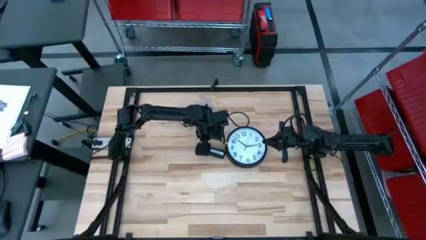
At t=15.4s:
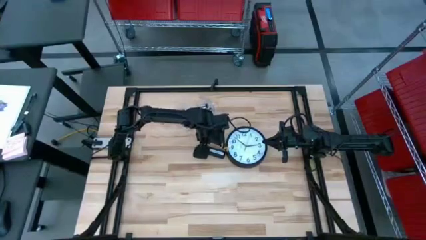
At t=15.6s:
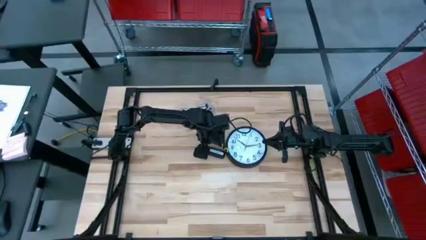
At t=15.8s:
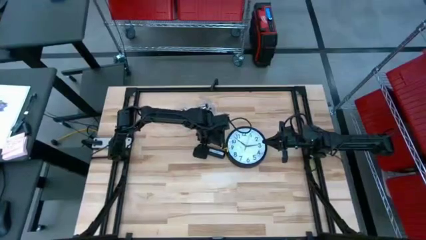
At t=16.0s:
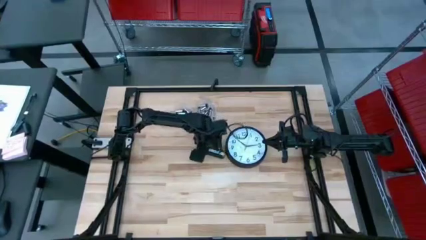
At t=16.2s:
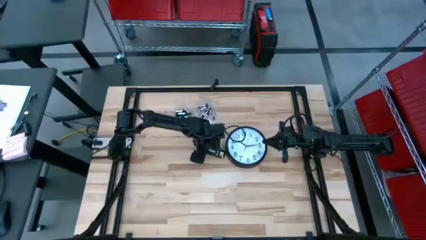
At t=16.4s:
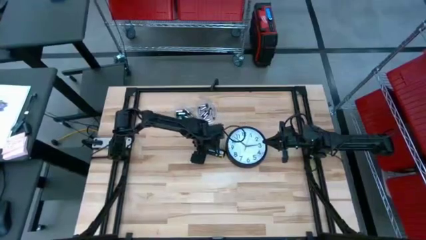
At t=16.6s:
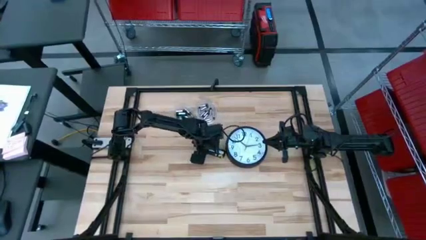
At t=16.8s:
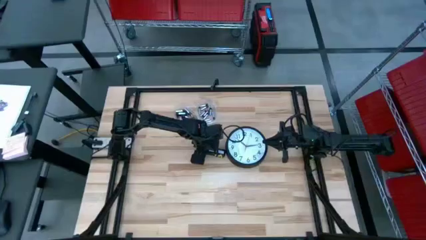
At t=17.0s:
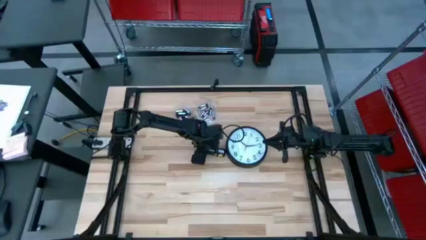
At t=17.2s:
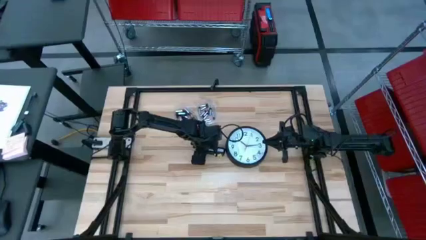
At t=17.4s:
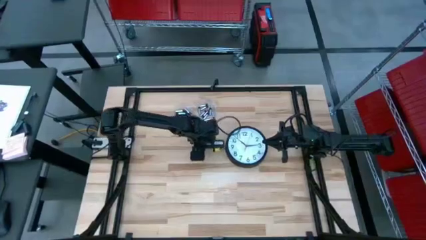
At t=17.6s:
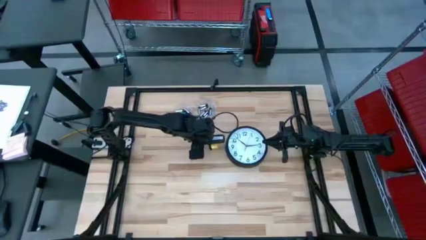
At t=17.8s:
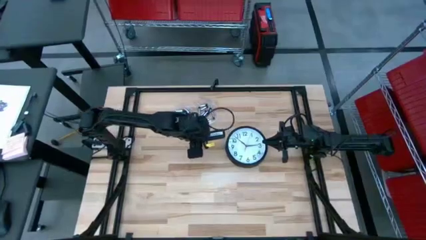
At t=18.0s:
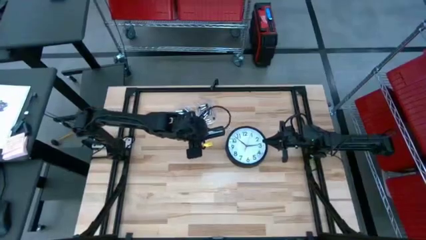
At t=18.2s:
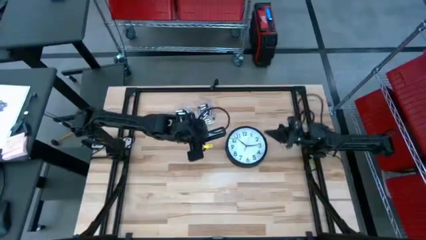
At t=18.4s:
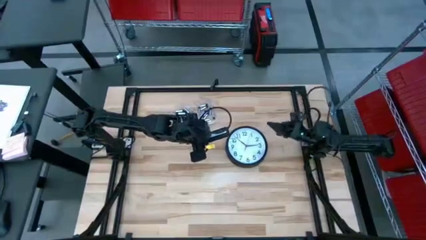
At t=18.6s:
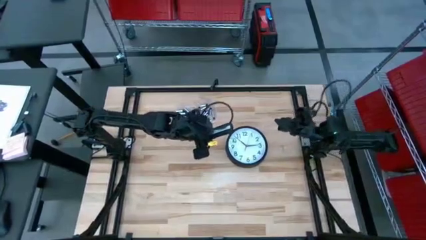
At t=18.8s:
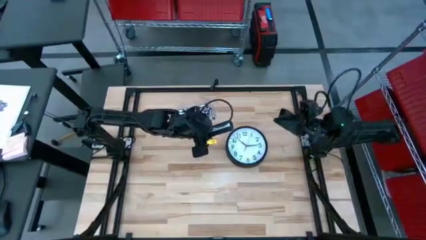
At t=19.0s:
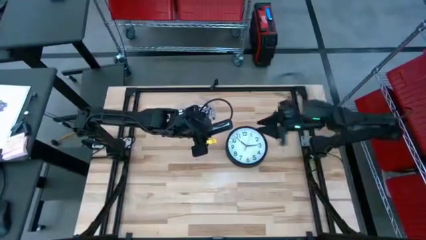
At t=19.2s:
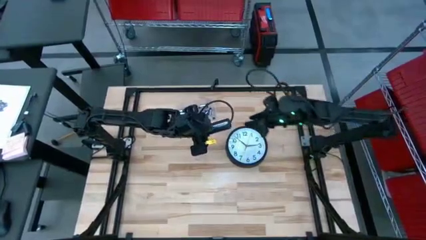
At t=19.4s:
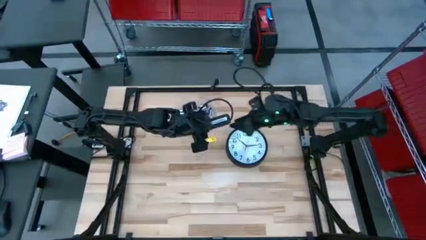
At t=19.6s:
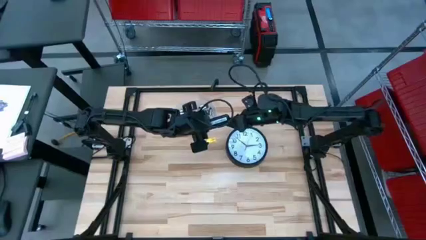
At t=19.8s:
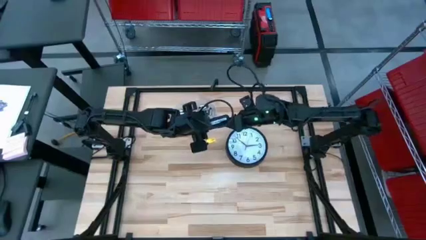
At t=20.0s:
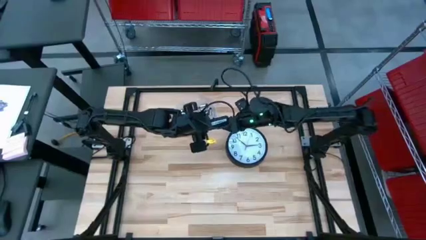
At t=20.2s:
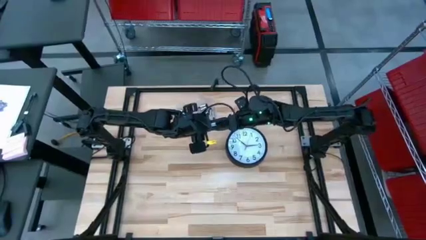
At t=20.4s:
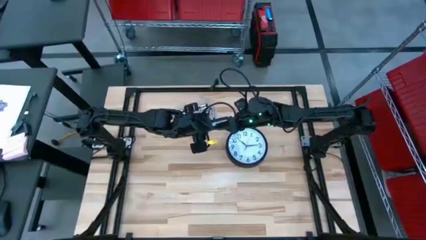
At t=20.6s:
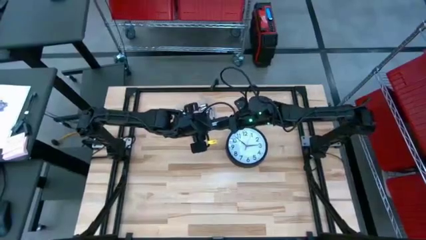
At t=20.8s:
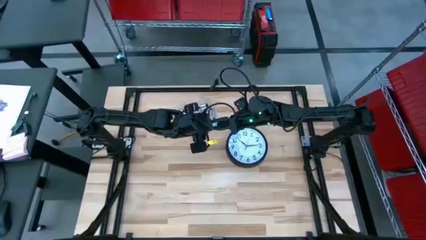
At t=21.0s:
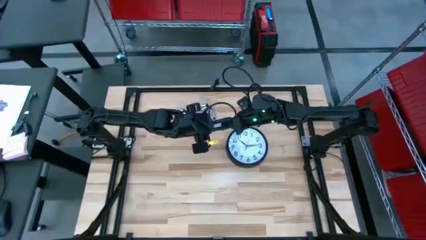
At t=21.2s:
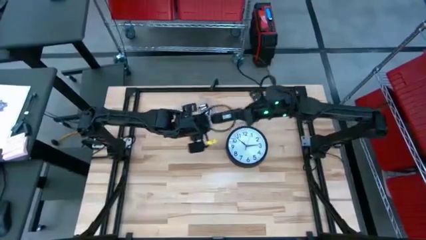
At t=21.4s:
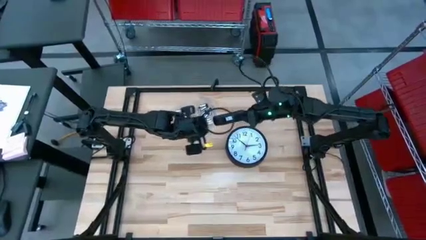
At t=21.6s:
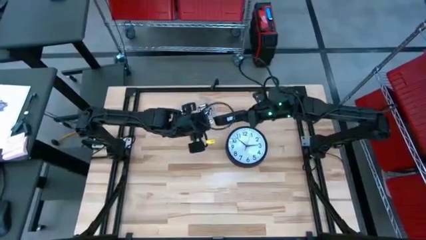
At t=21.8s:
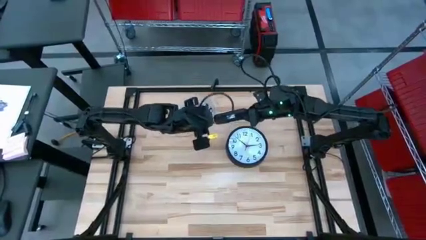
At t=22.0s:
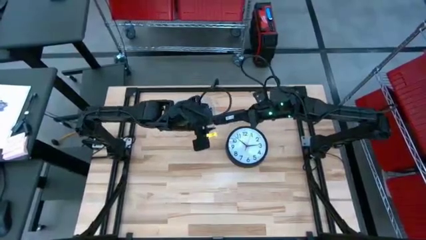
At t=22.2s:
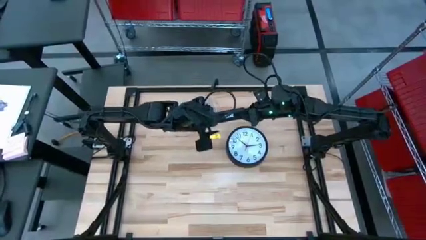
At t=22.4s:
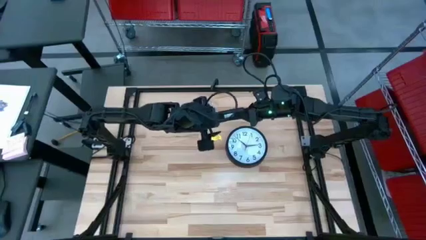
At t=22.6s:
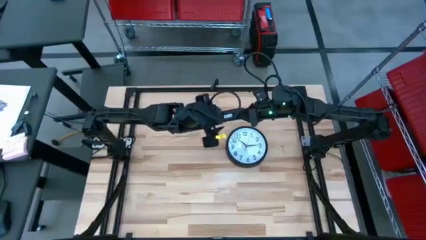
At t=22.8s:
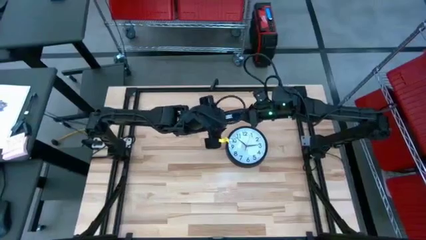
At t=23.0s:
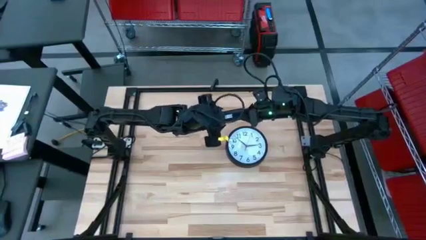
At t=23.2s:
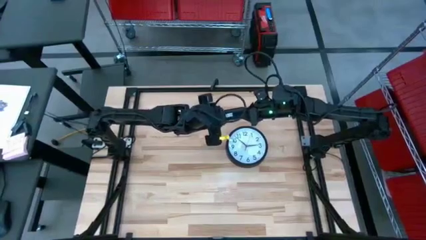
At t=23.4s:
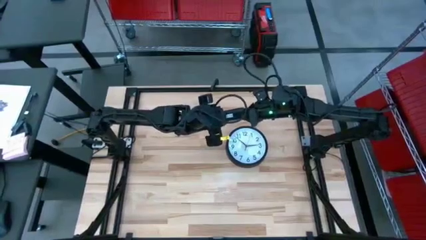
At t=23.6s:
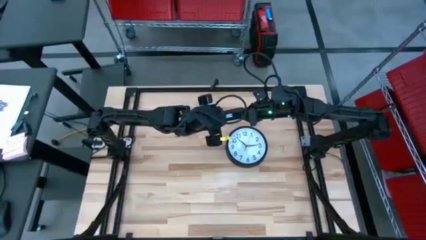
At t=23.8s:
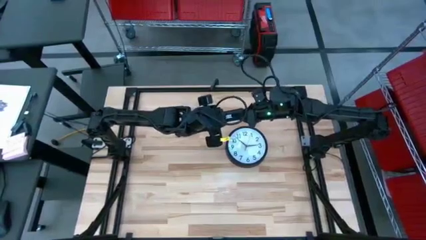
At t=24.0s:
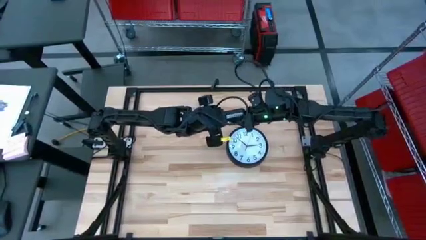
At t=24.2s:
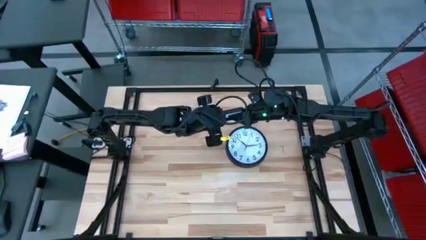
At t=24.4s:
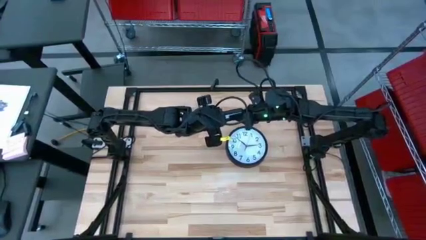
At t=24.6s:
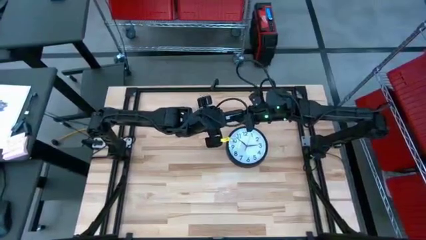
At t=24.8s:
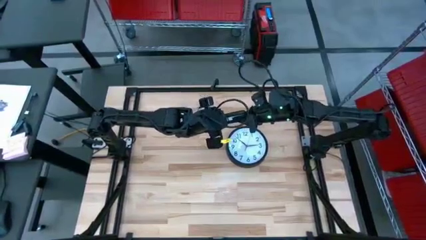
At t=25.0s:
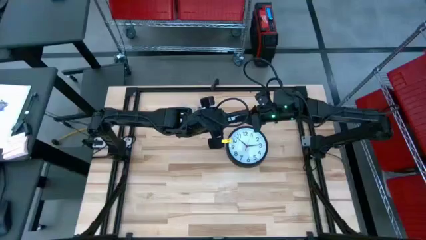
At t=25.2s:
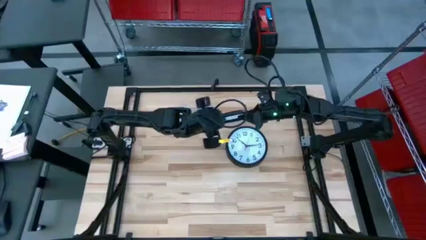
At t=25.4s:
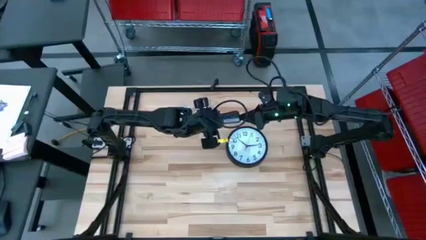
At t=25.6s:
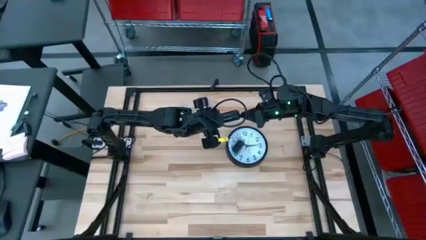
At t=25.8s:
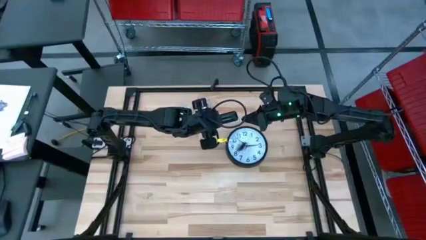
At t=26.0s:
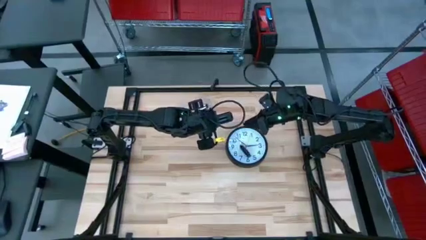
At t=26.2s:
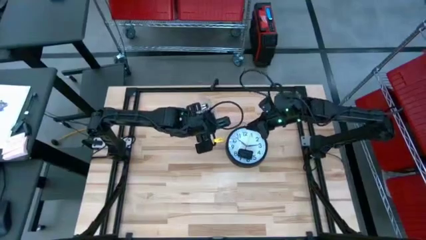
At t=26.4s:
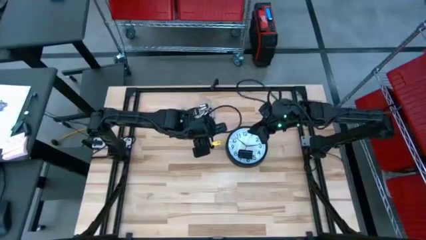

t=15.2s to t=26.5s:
Task: Insert battery
Open the remote battery cover
